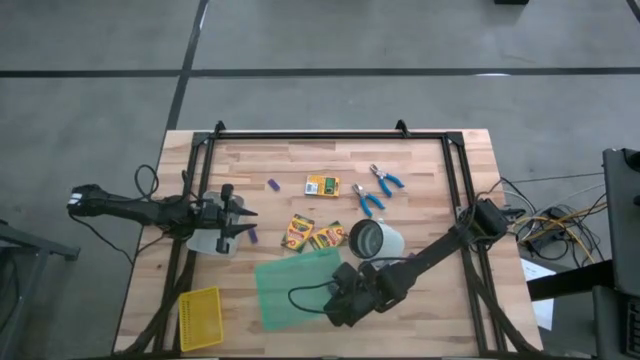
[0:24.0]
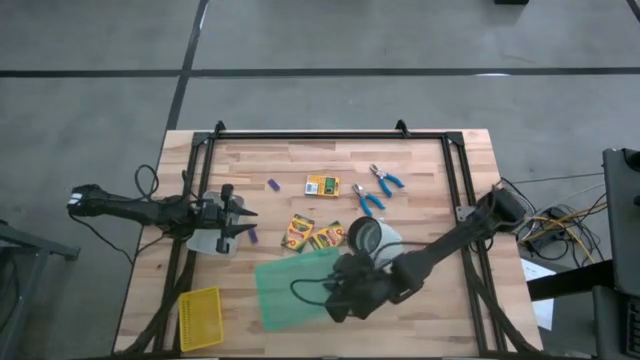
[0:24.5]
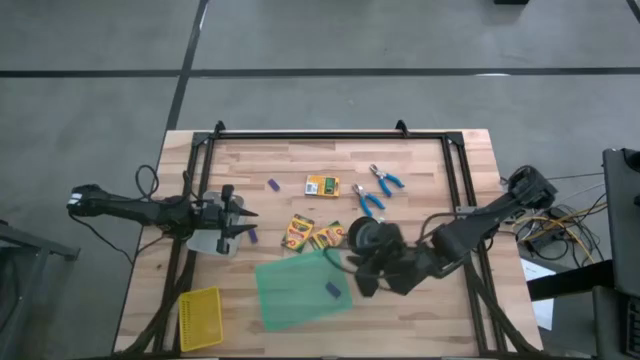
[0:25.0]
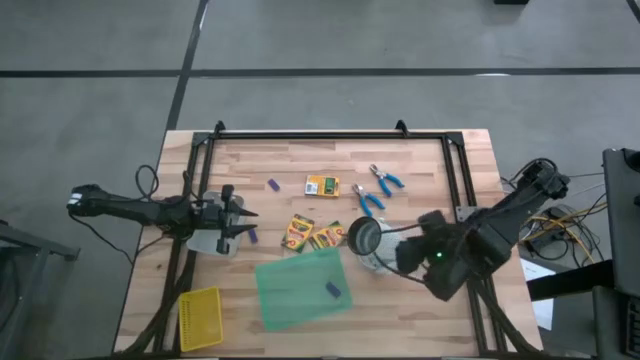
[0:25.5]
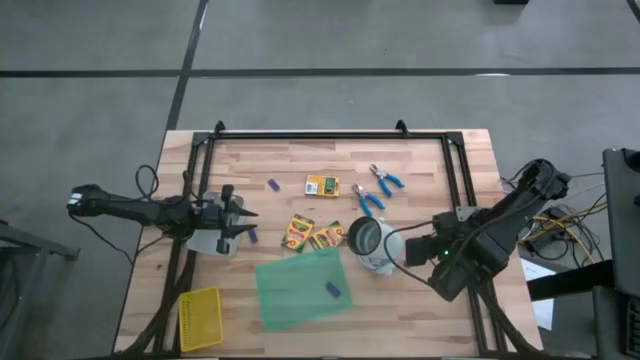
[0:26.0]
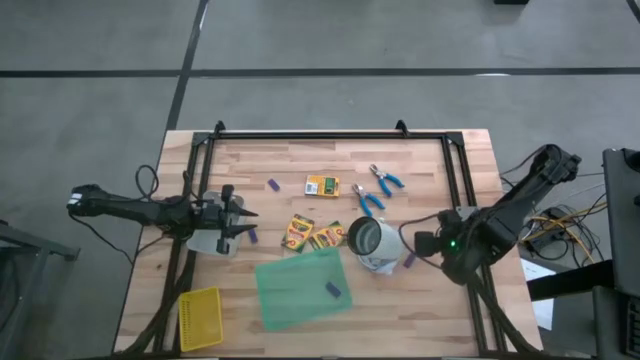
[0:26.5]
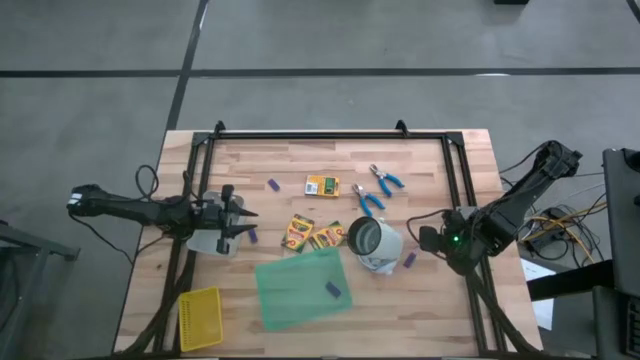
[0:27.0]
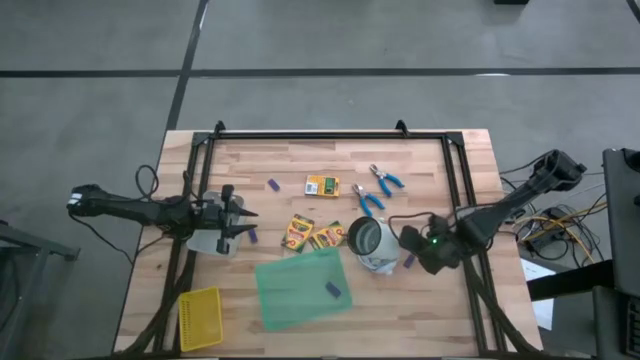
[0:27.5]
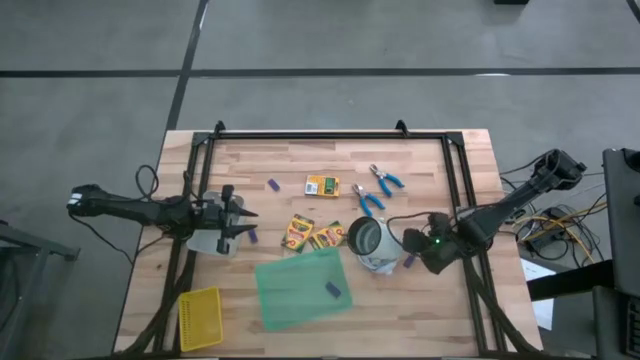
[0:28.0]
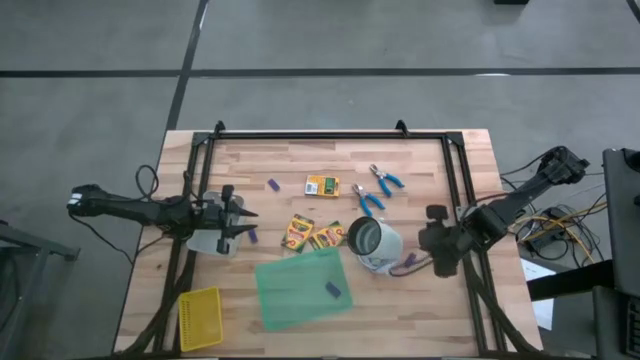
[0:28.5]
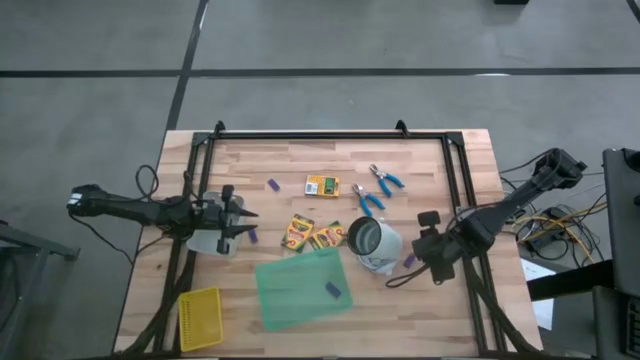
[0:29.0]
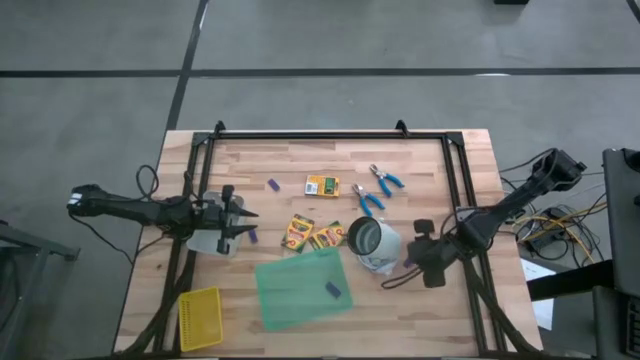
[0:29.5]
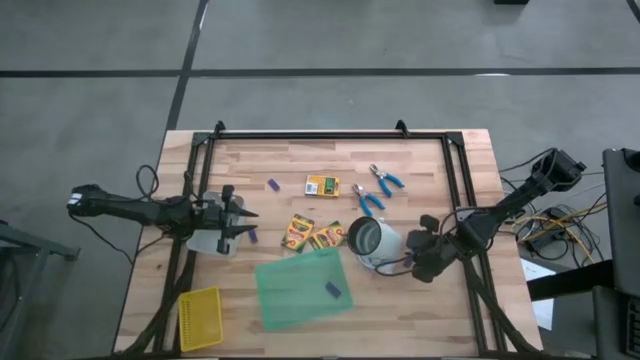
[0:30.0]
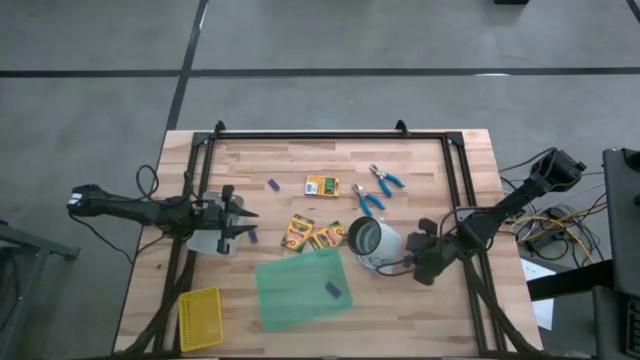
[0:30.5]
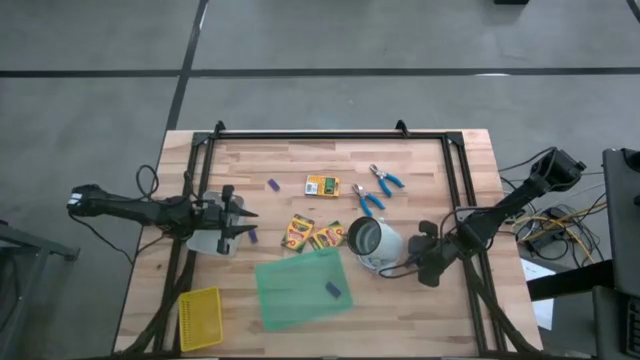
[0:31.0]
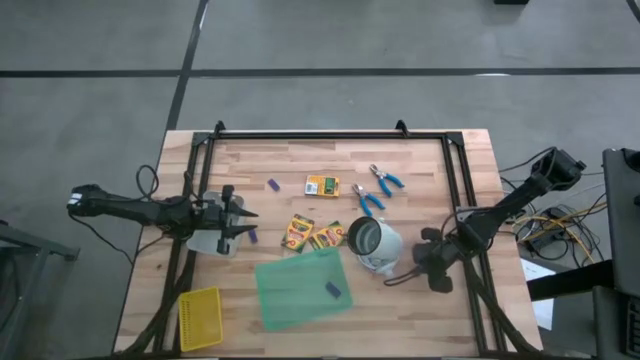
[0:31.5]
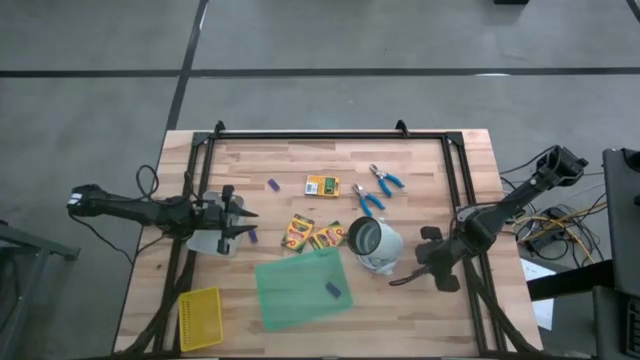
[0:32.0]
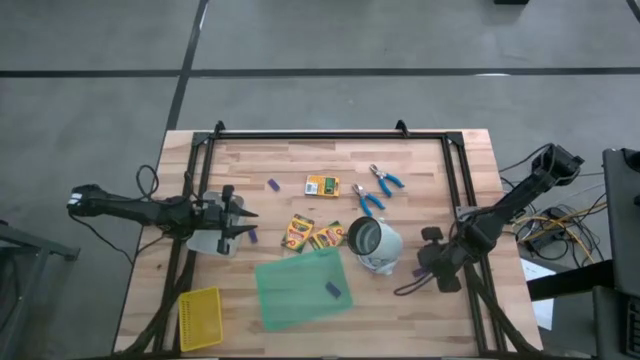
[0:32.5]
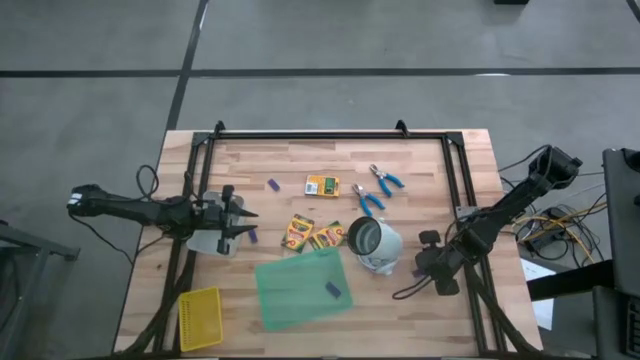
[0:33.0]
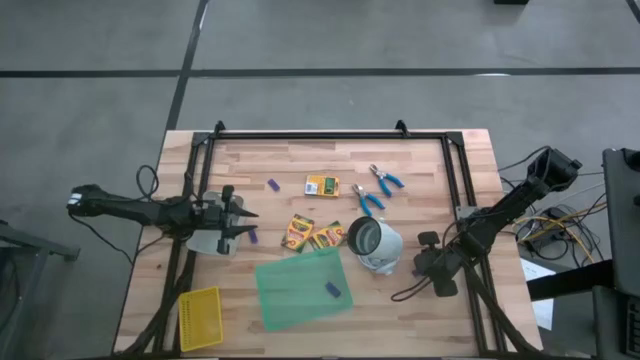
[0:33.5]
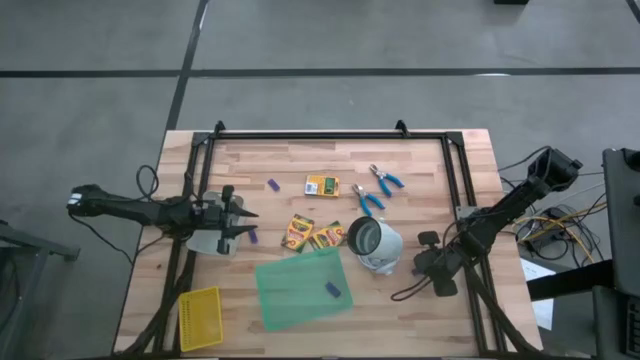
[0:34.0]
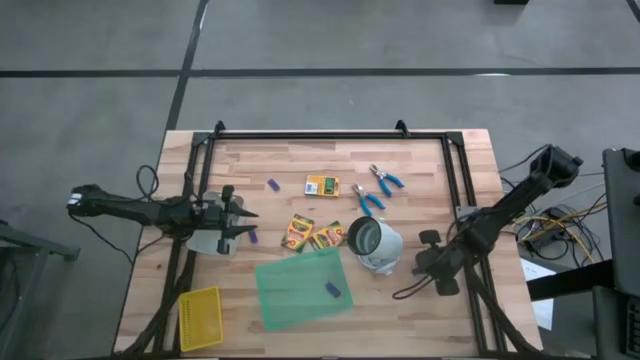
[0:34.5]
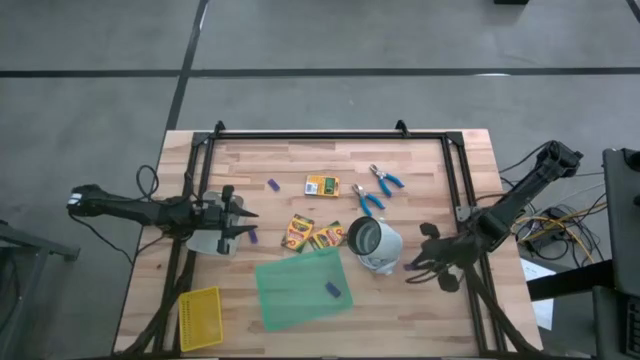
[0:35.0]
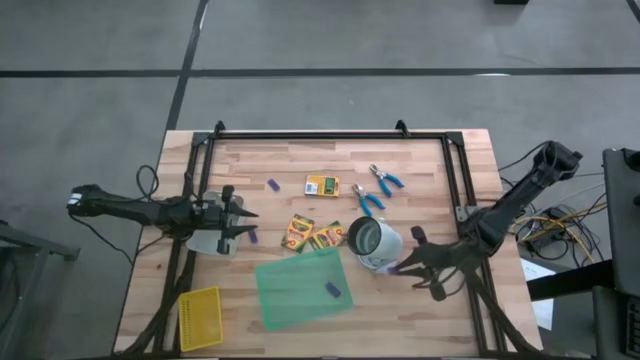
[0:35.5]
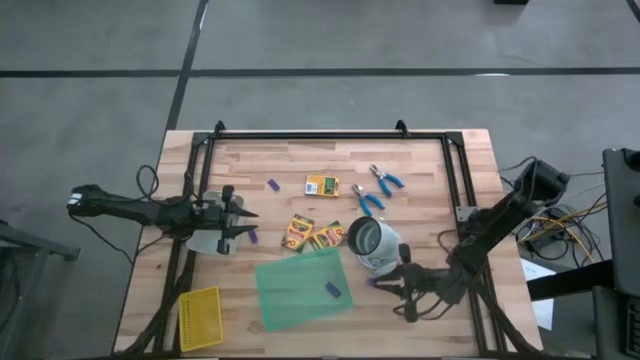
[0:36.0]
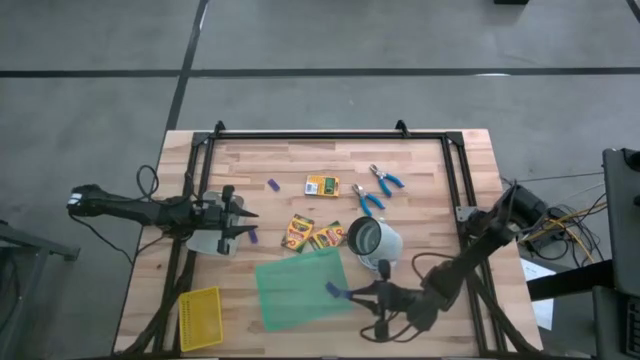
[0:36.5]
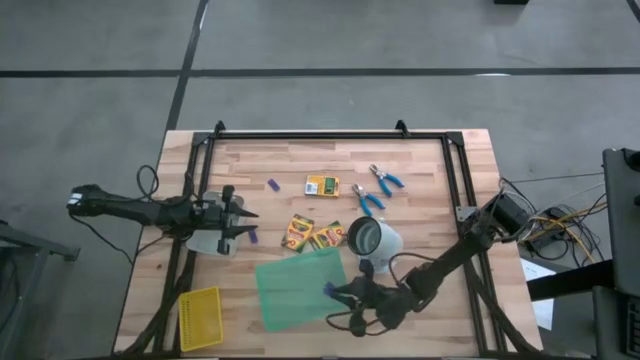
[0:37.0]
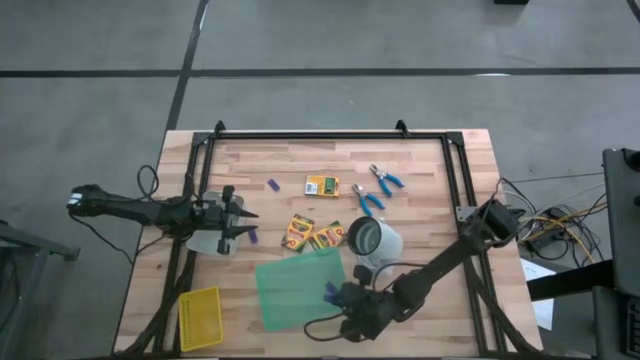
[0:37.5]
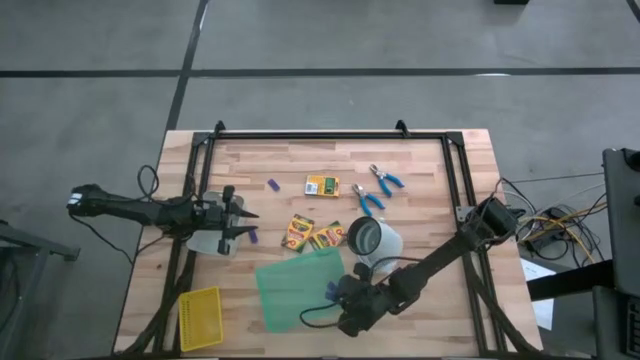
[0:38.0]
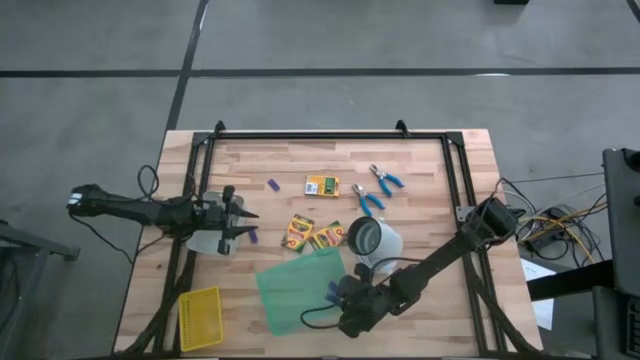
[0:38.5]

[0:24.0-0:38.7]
Task: Pick & Place School Supplies
Put the blue eraser into the green bin

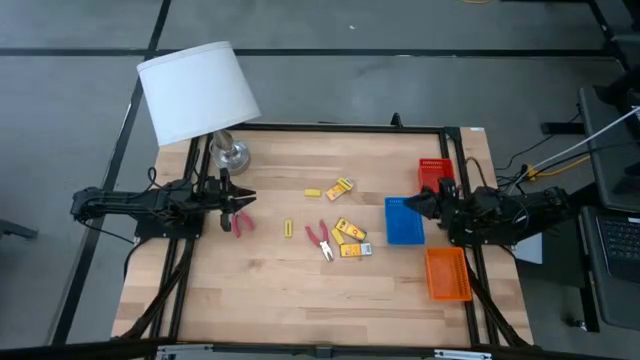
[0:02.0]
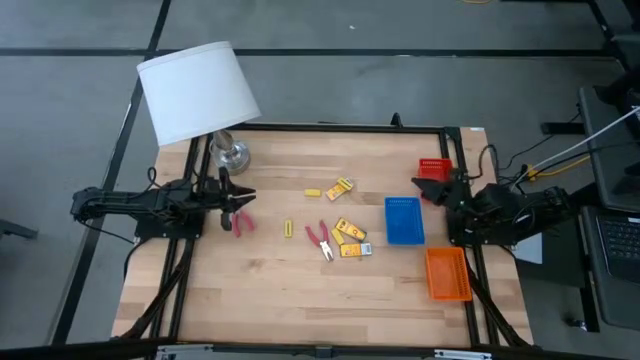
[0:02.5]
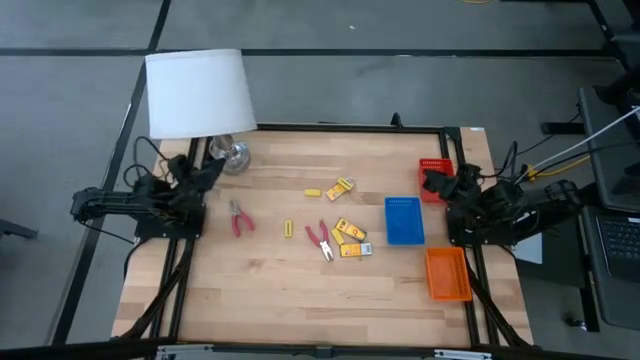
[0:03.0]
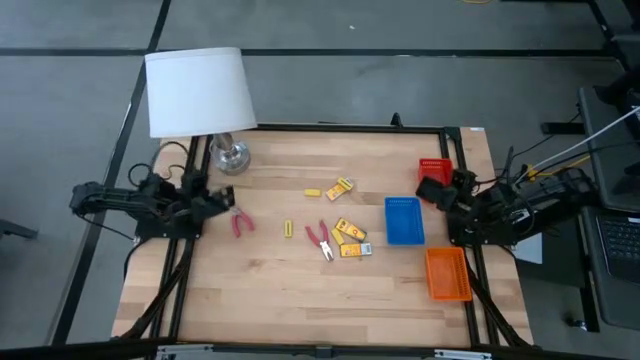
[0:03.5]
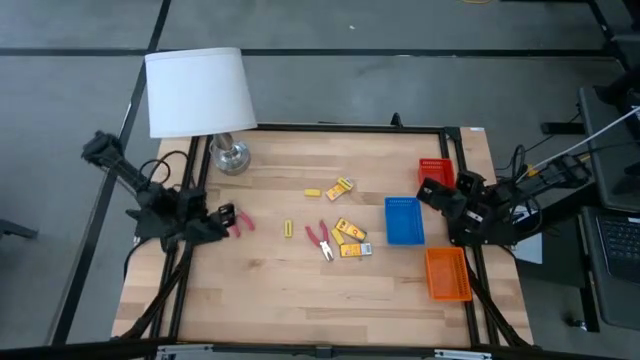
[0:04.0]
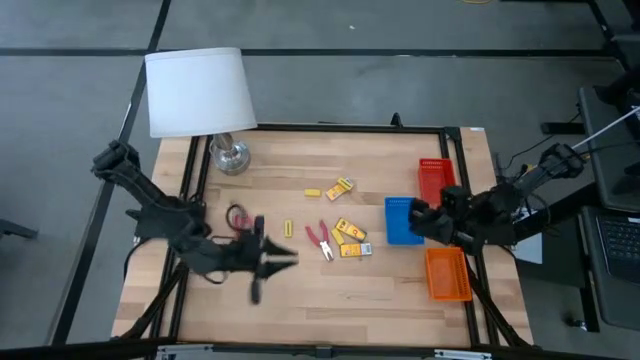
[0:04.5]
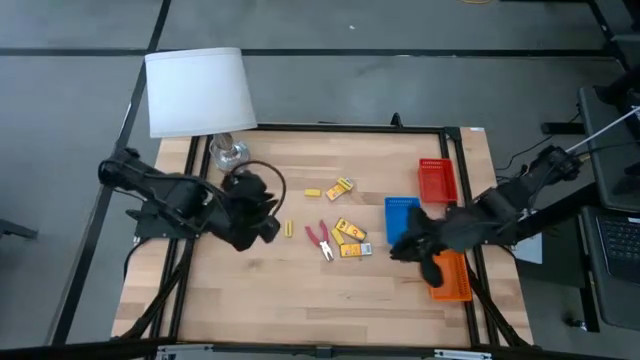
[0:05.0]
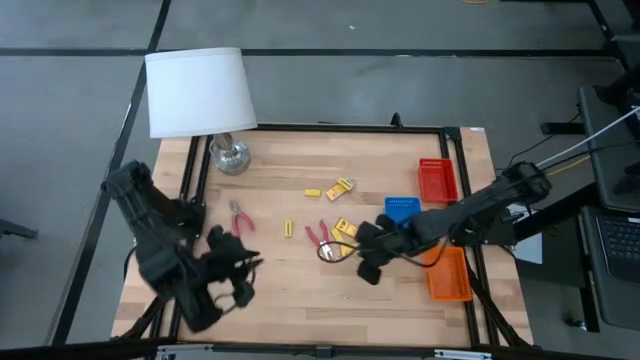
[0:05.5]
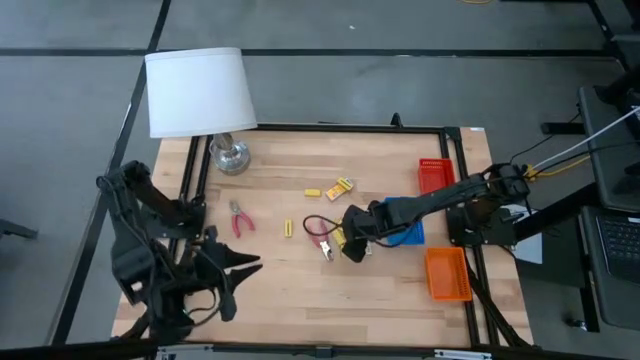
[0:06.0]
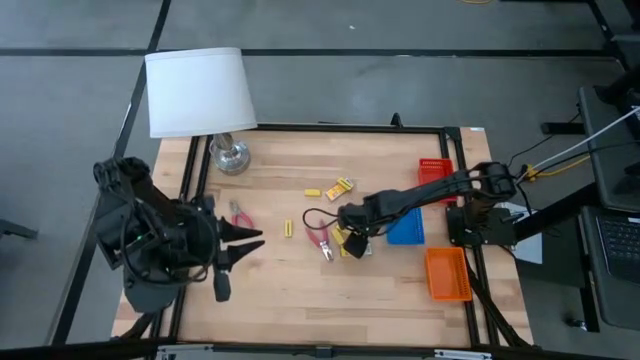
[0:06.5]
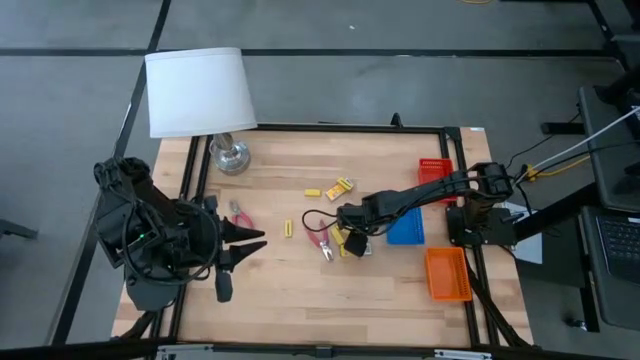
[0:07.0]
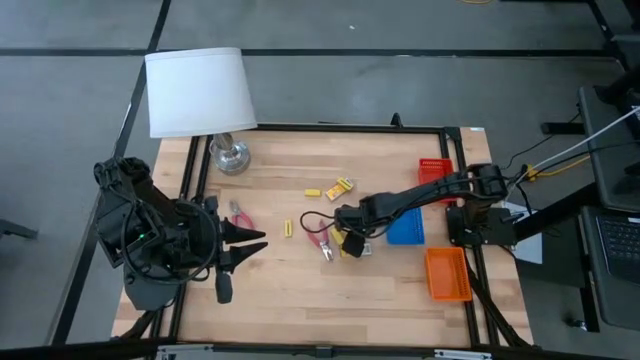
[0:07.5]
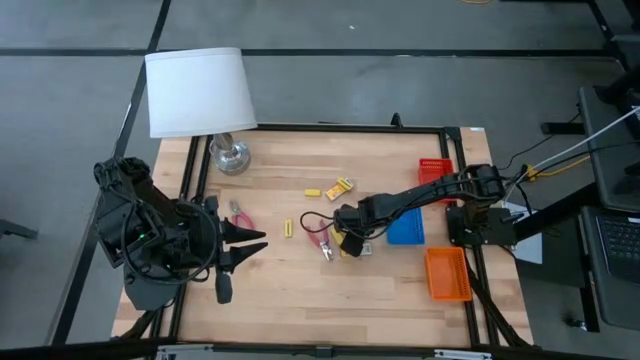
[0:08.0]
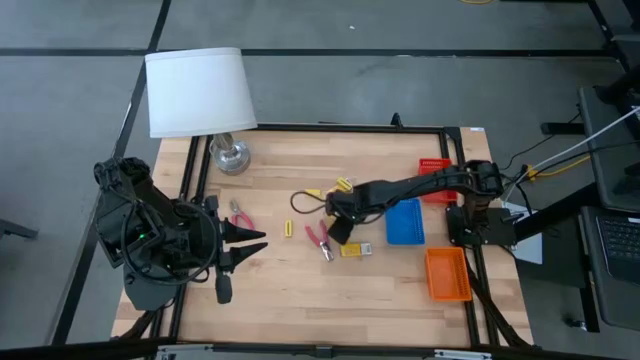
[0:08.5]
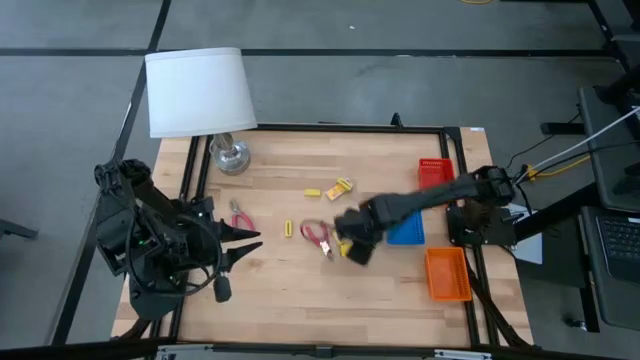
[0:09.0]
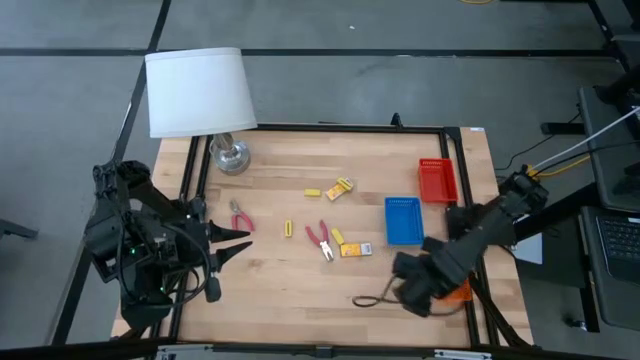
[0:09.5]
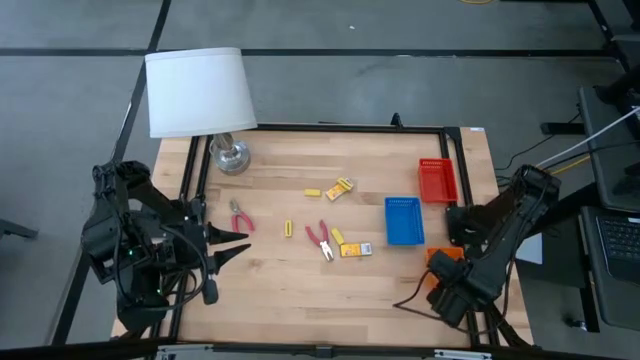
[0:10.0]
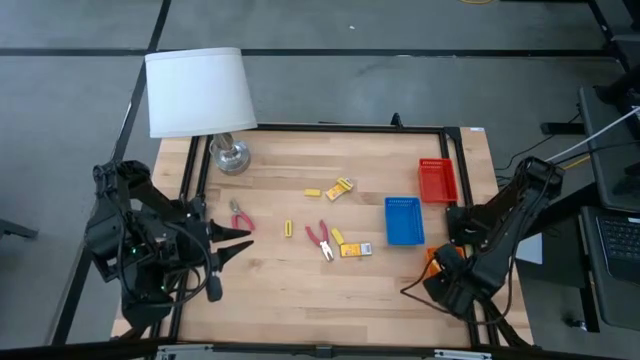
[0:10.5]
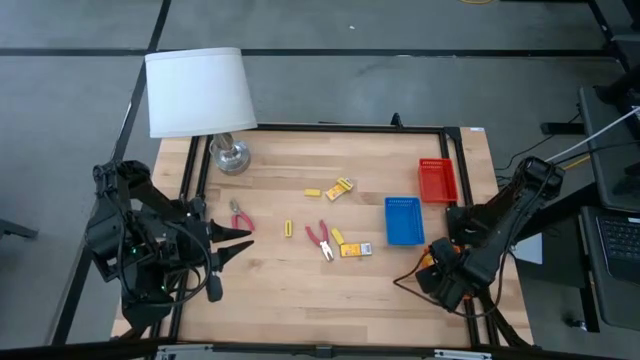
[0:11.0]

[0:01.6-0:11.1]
Task: Pick & Place School Supplies
Put the middle box of crayons into the orange bin
